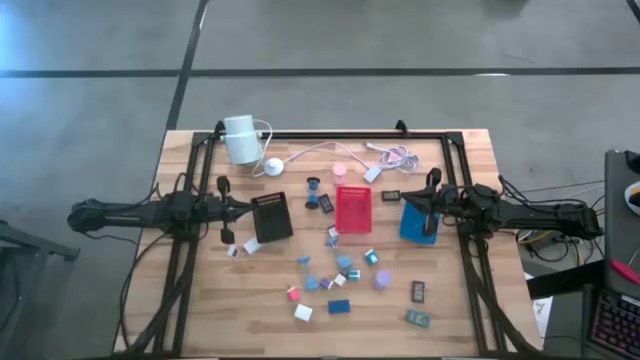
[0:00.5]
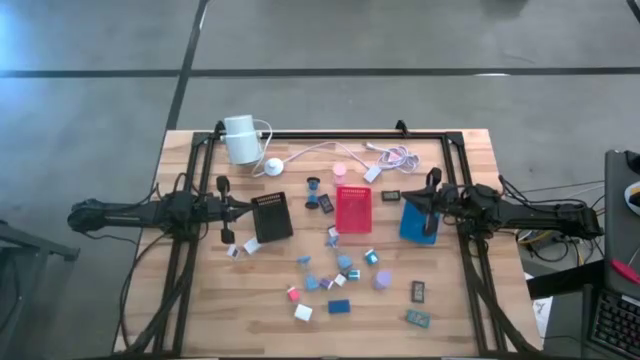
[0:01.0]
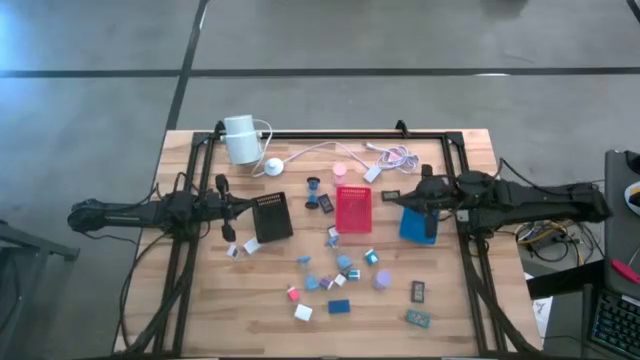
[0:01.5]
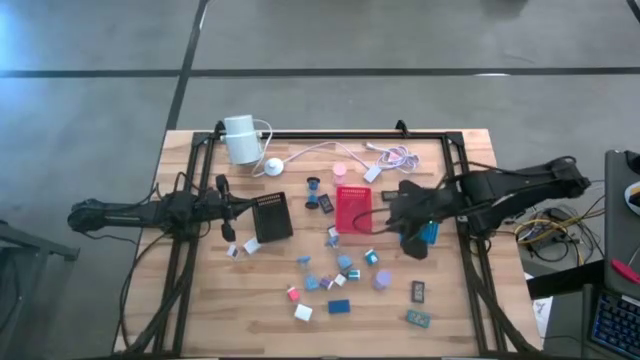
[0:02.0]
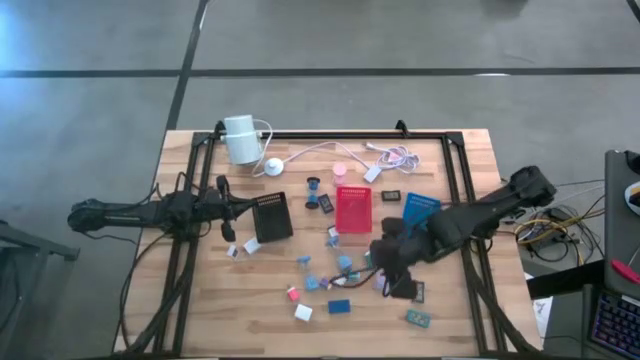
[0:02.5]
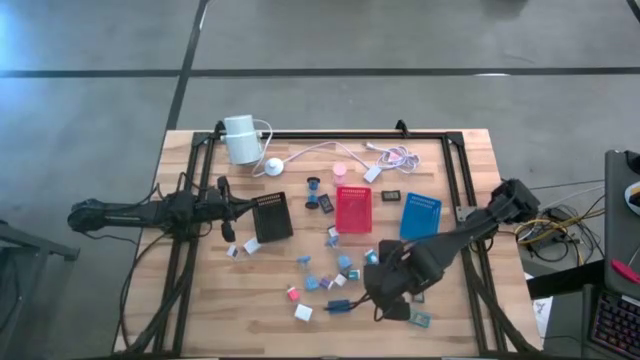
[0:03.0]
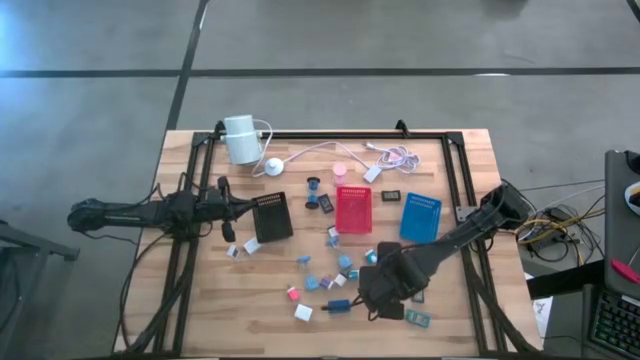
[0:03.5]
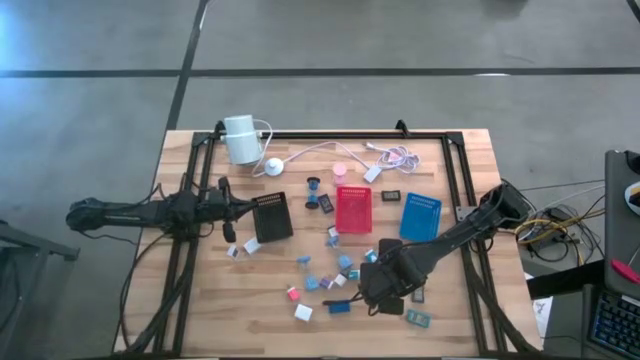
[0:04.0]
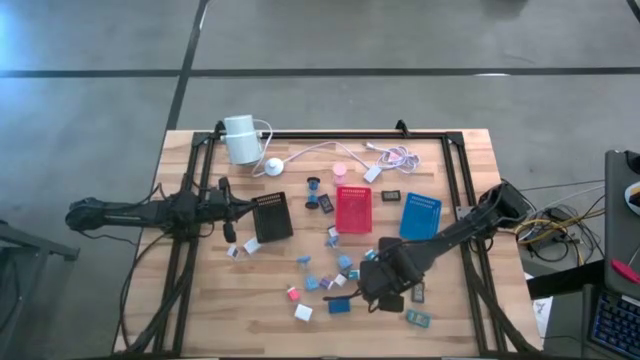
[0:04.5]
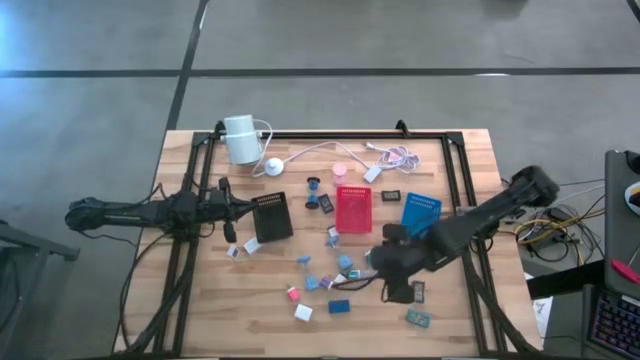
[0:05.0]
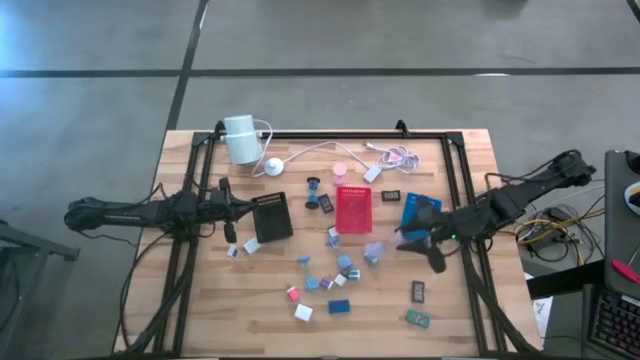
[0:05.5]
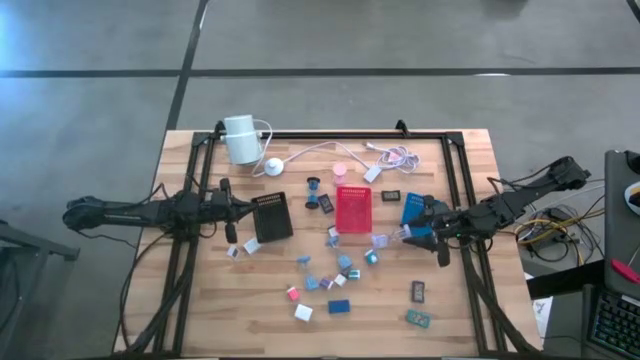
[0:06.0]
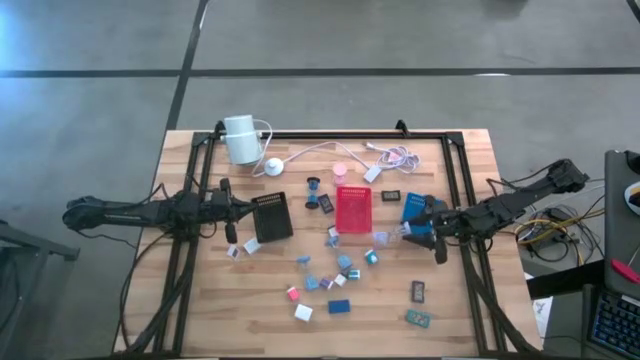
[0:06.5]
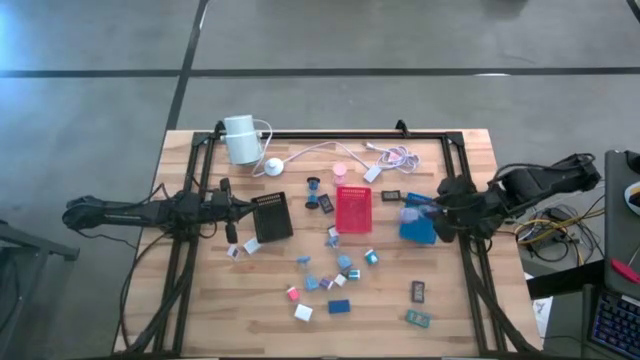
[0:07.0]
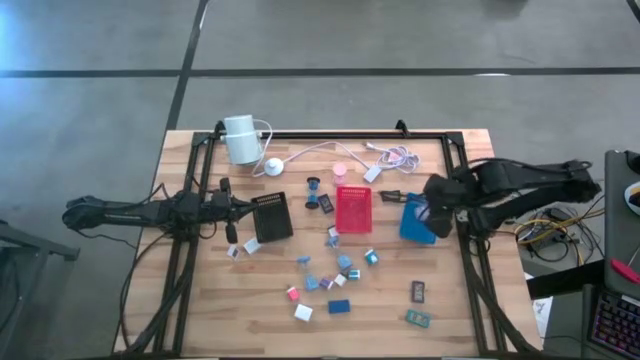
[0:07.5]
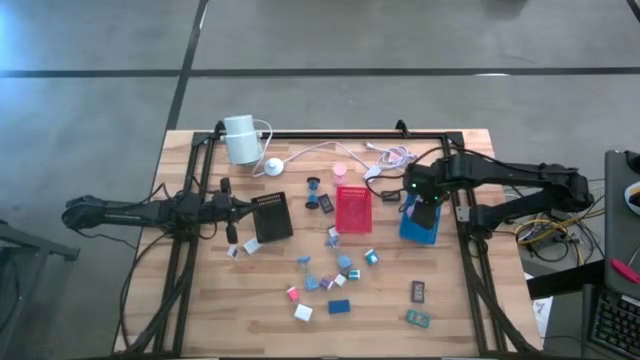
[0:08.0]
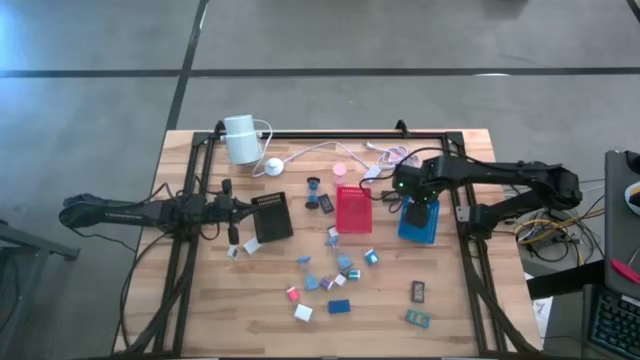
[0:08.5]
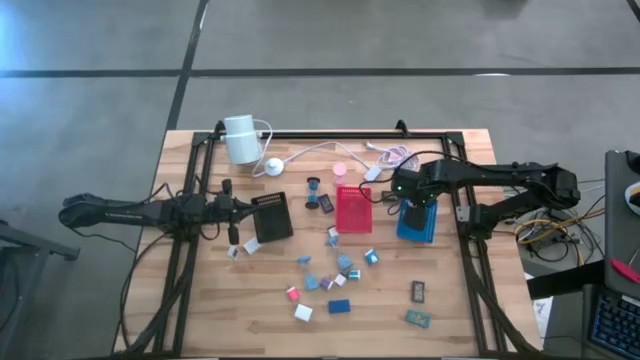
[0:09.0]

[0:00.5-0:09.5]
Task: Pick & Place Office items
Put the purple hourglass into the blue bin

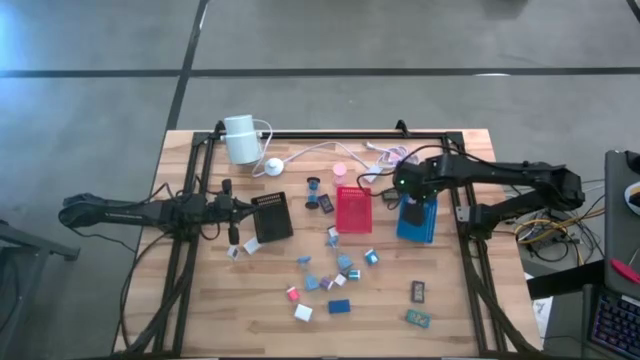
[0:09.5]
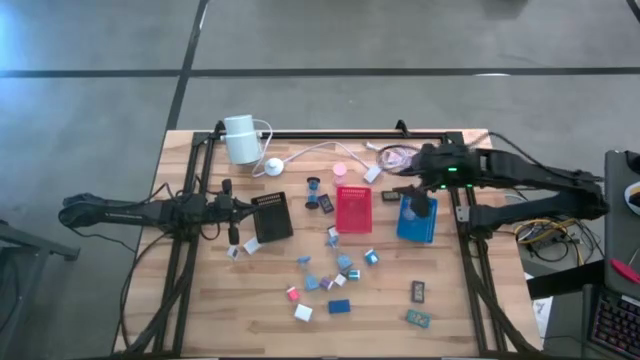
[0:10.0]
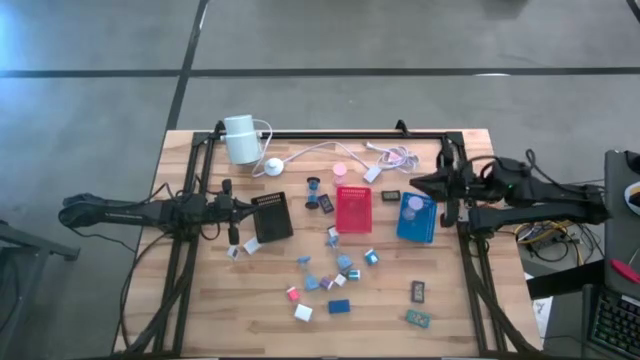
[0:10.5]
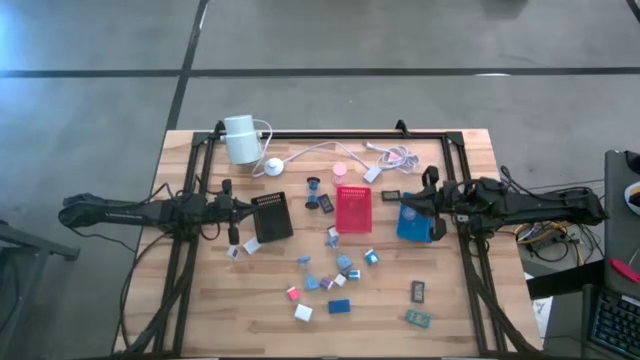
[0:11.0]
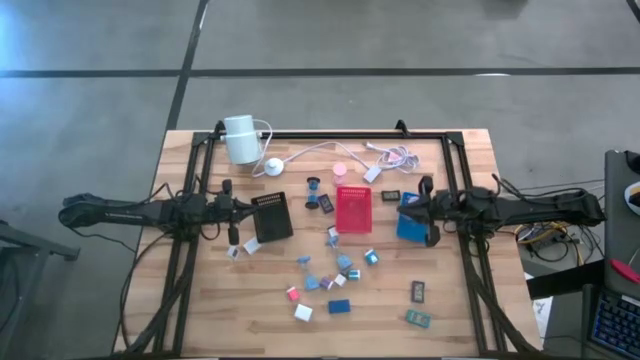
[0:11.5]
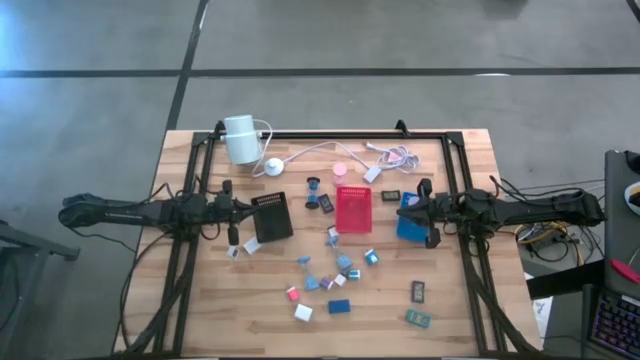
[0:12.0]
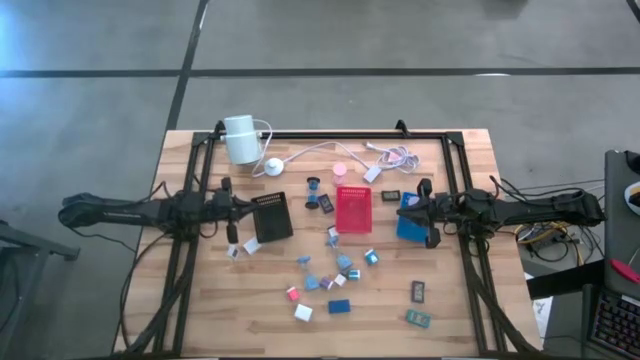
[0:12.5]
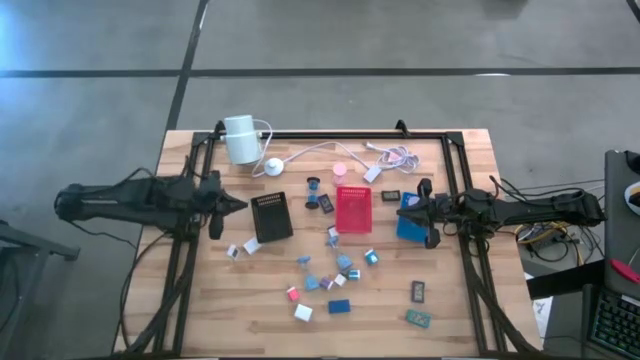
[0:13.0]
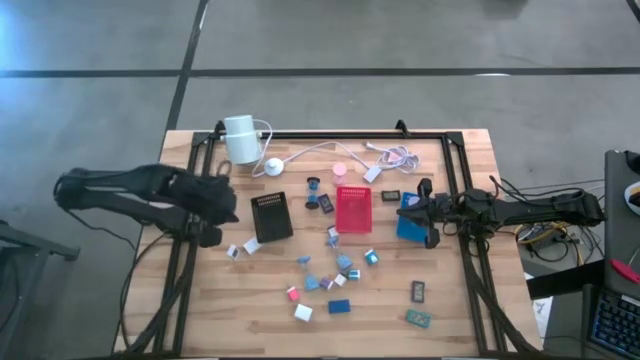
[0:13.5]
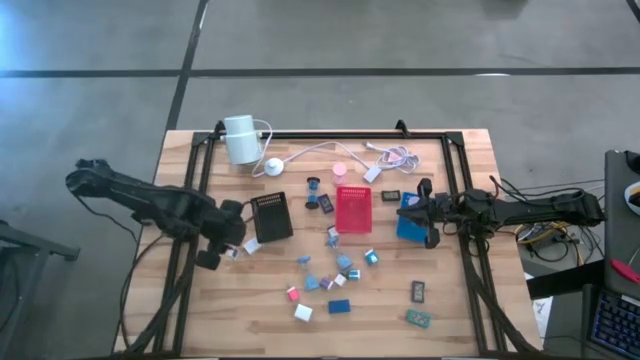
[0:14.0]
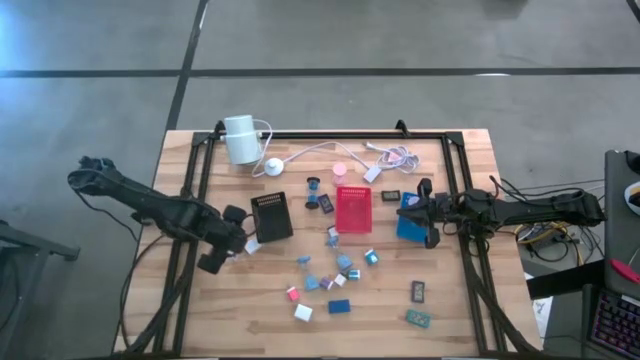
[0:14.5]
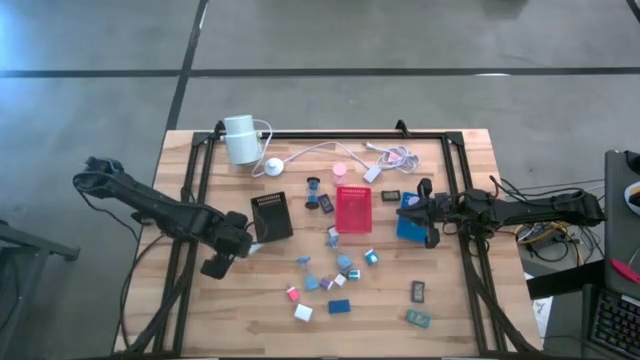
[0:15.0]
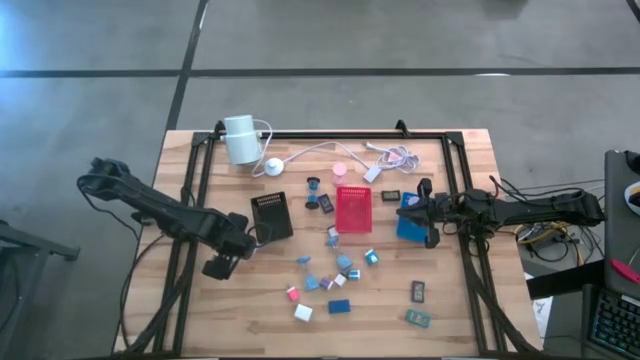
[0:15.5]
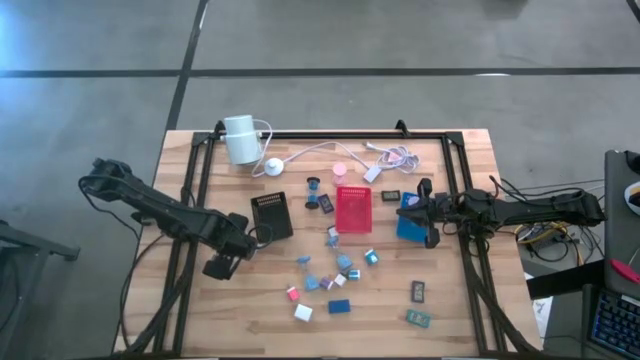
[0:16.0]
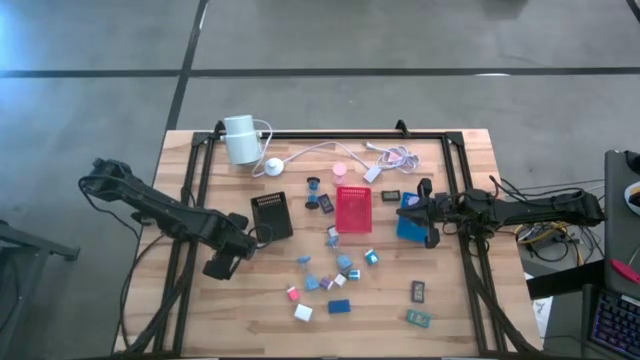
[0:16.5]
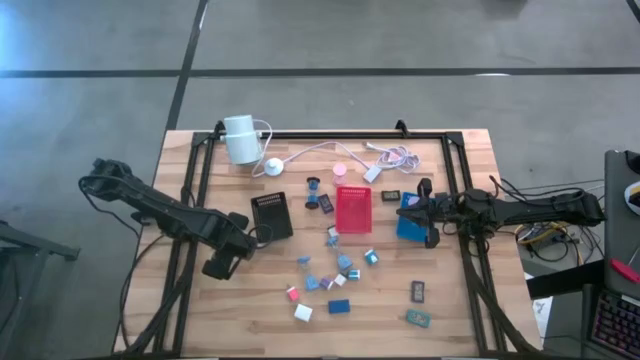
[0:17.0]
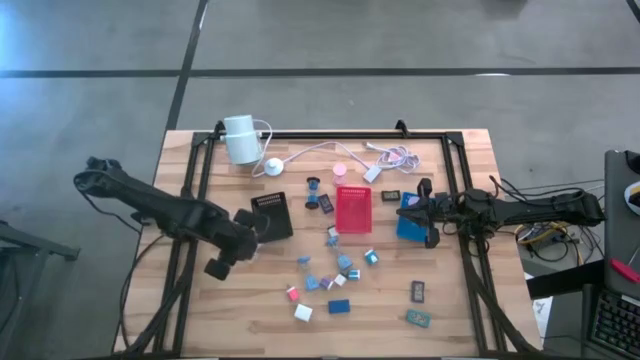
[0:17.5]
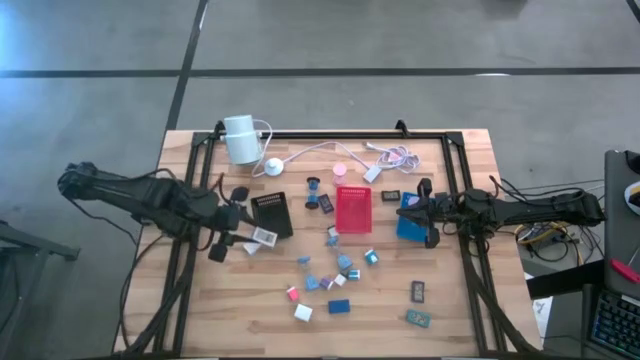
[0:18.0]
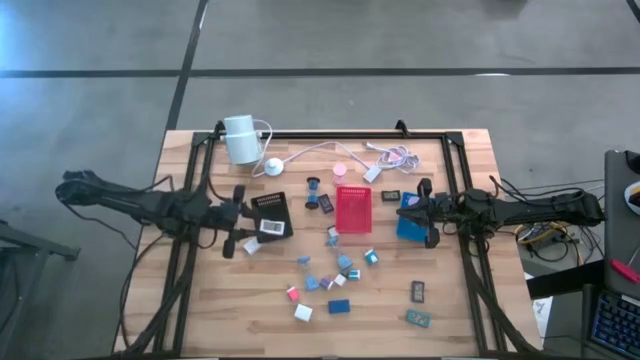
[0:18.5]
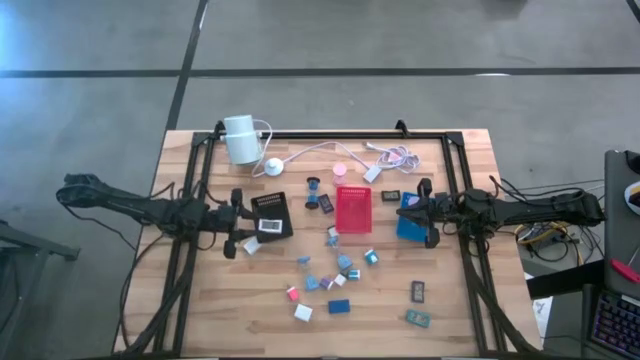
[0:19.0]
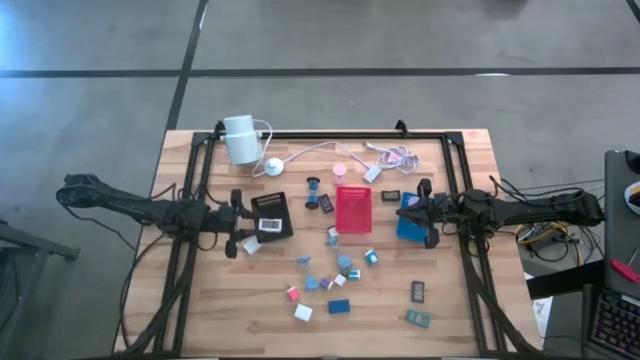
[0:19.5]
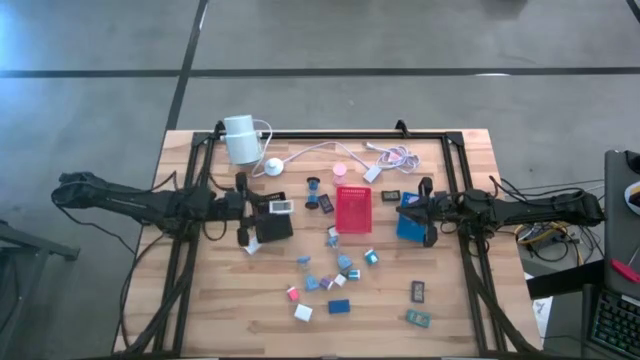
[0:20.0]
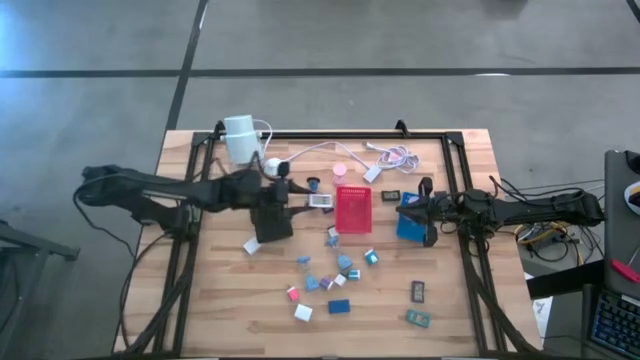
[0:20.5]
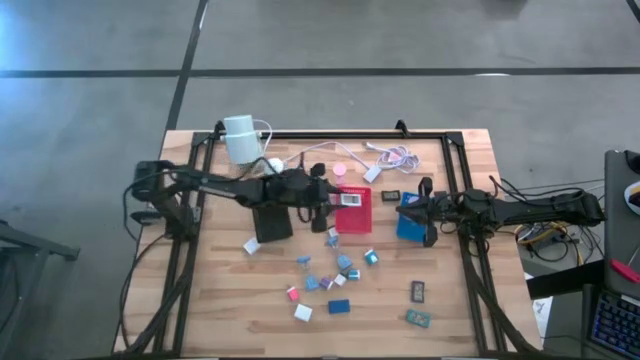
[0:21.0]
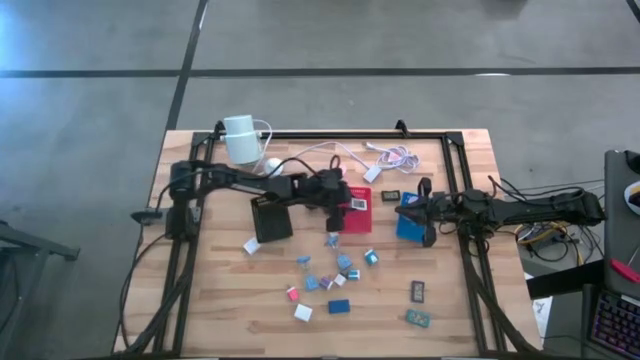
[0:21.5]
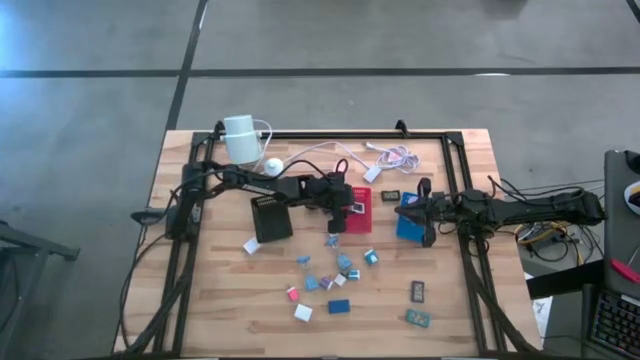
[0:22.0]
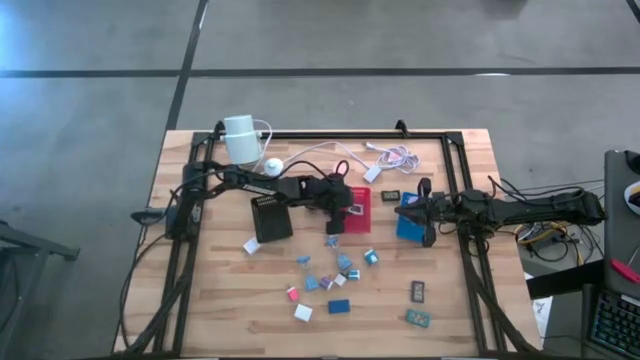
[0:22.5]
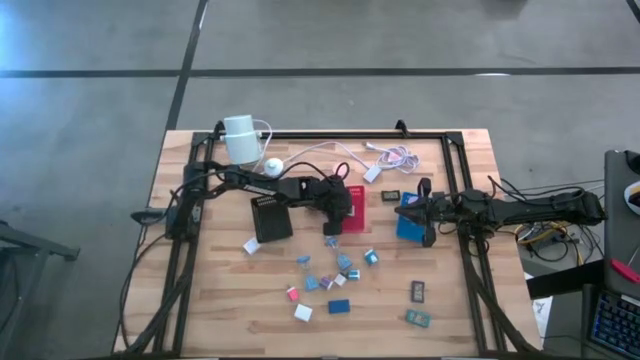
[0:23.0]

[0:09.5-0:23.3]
Put the left white digital clock into the red bin
